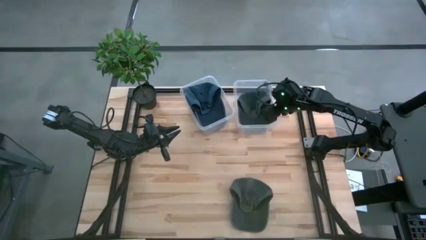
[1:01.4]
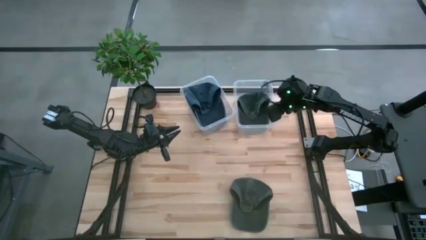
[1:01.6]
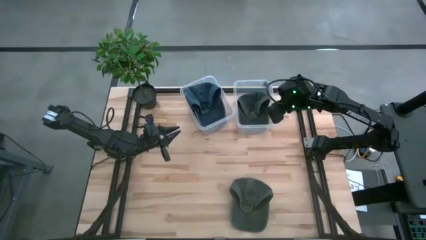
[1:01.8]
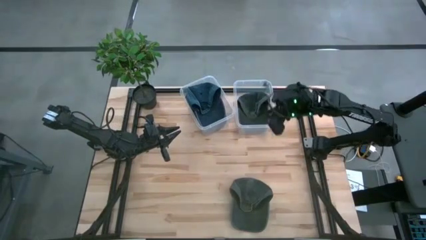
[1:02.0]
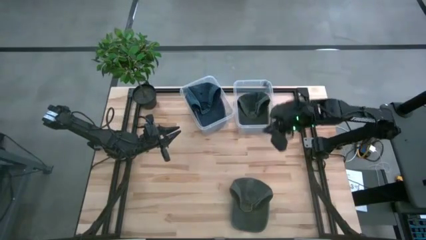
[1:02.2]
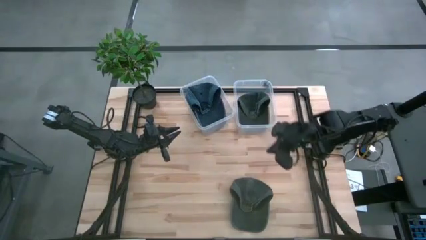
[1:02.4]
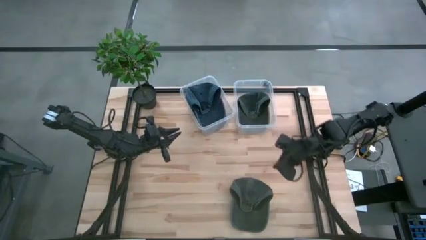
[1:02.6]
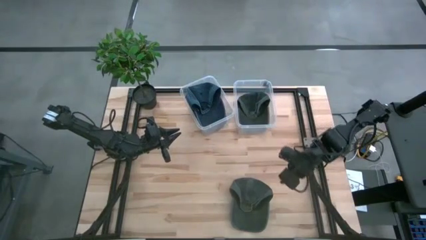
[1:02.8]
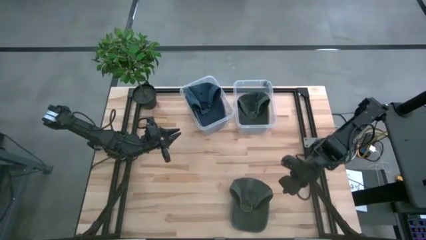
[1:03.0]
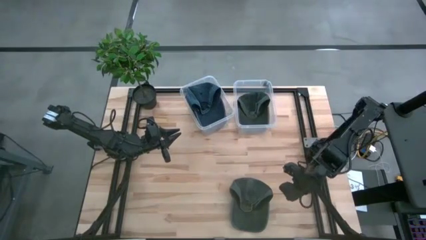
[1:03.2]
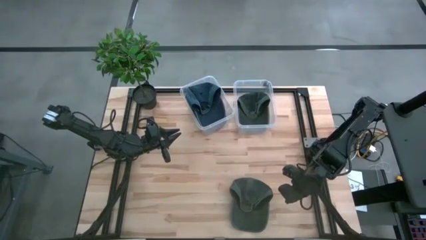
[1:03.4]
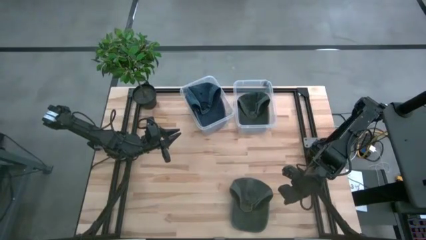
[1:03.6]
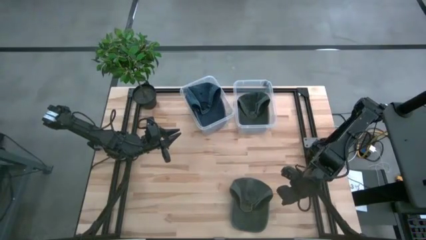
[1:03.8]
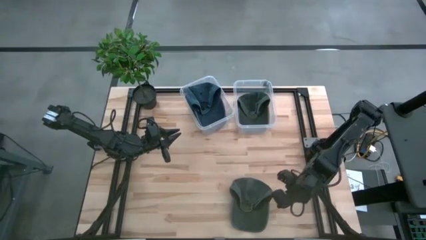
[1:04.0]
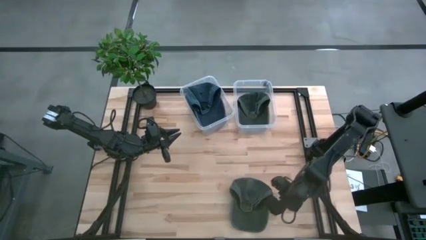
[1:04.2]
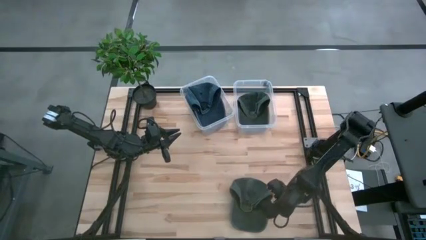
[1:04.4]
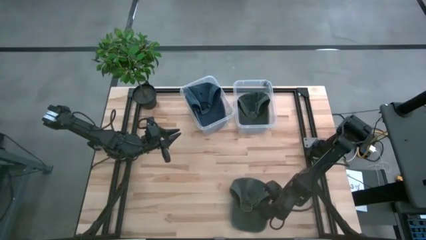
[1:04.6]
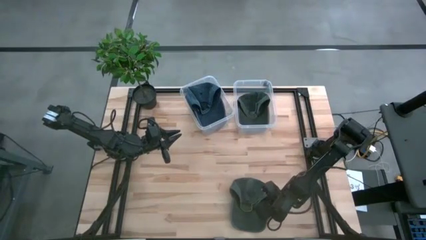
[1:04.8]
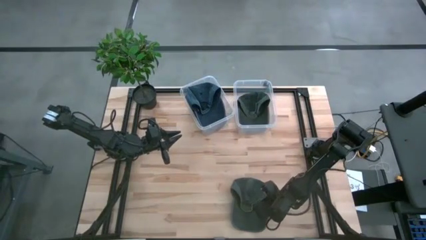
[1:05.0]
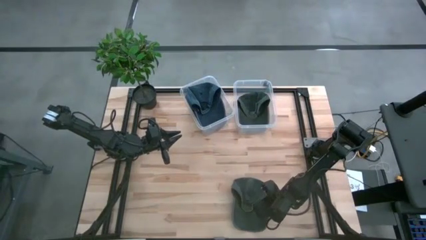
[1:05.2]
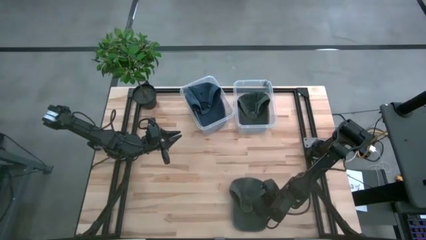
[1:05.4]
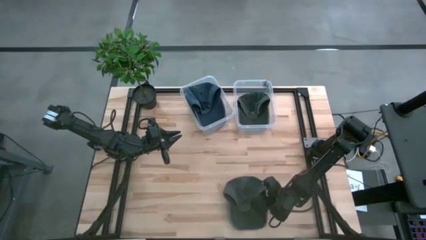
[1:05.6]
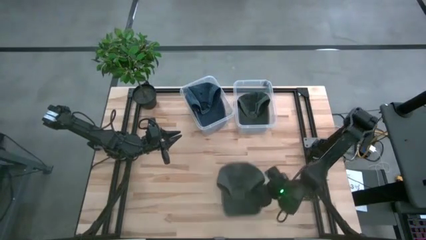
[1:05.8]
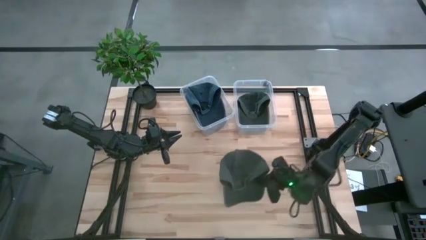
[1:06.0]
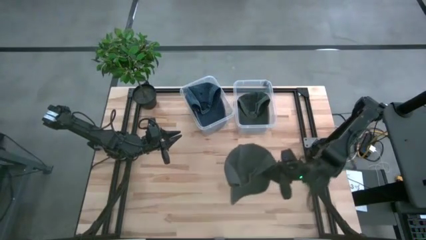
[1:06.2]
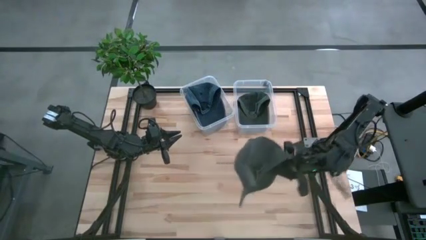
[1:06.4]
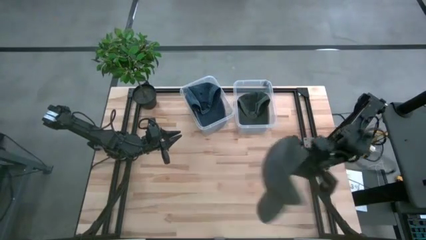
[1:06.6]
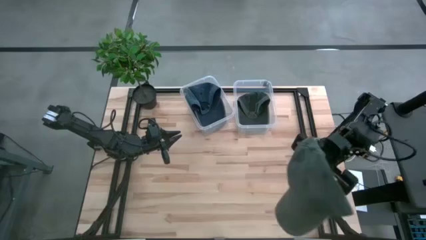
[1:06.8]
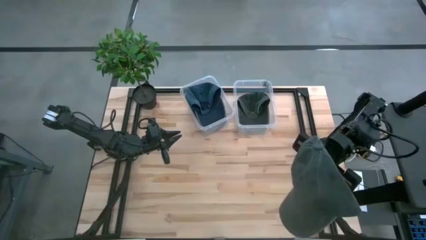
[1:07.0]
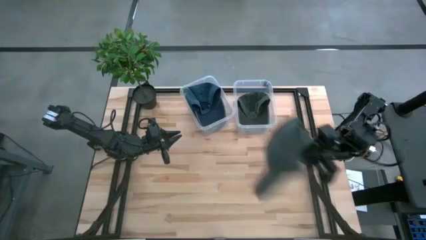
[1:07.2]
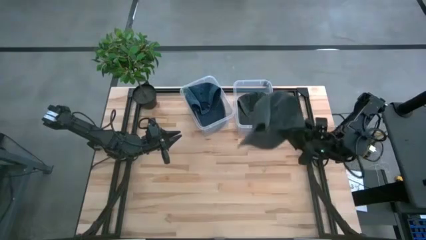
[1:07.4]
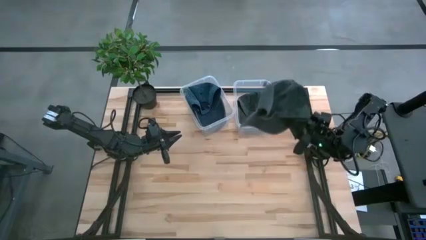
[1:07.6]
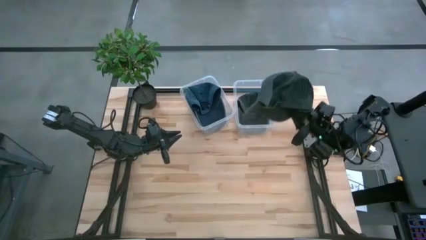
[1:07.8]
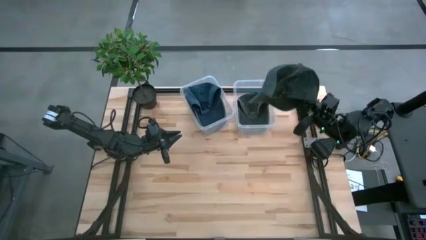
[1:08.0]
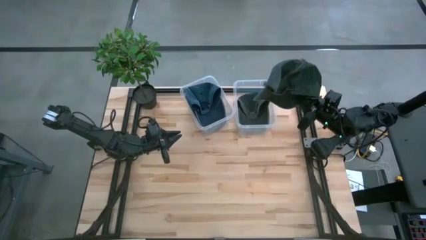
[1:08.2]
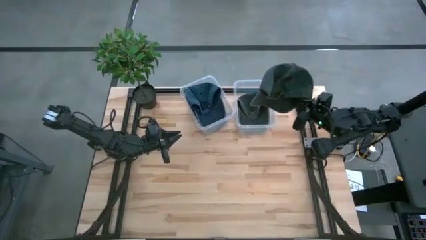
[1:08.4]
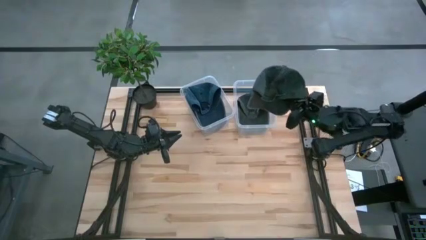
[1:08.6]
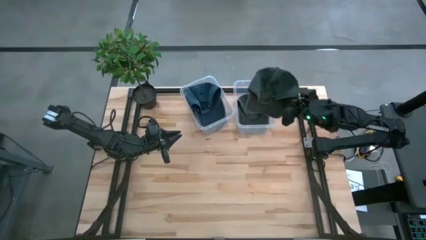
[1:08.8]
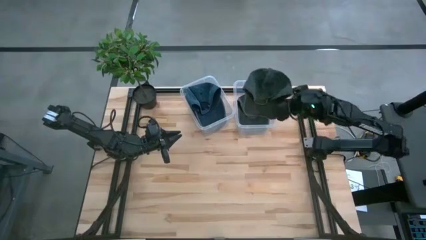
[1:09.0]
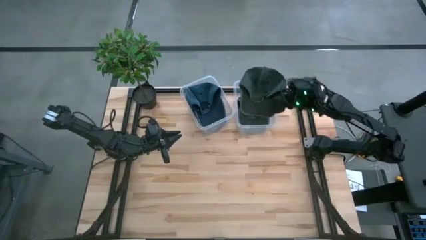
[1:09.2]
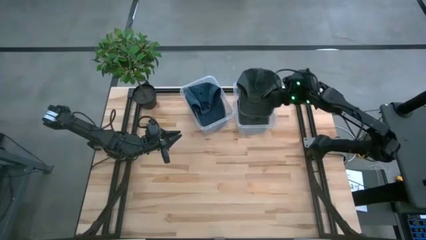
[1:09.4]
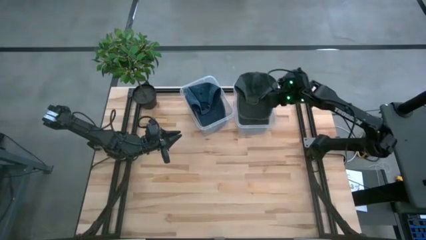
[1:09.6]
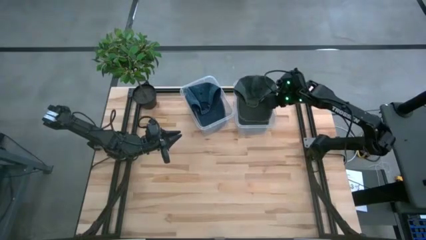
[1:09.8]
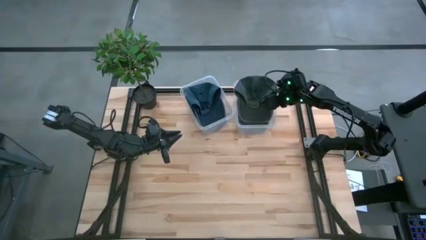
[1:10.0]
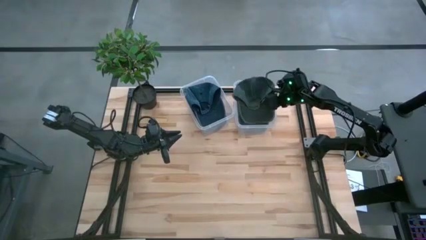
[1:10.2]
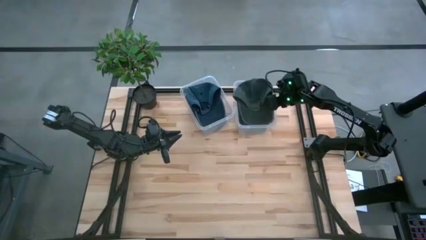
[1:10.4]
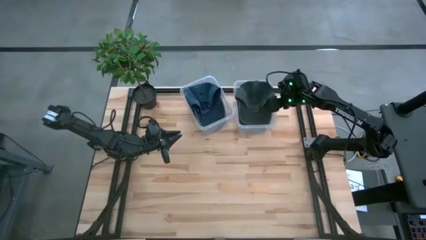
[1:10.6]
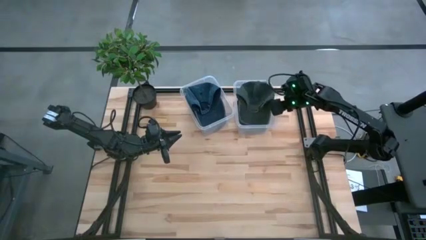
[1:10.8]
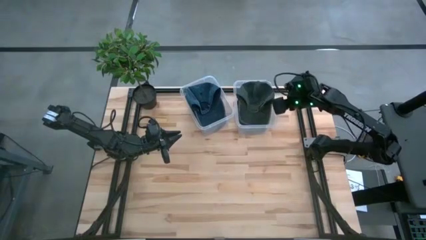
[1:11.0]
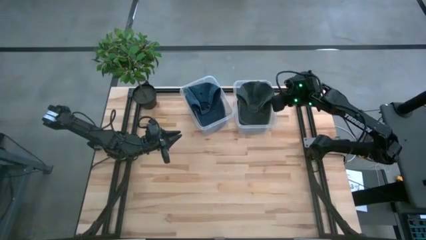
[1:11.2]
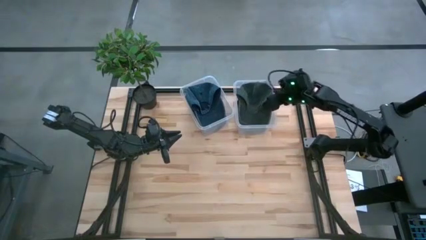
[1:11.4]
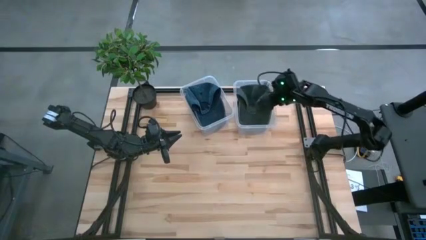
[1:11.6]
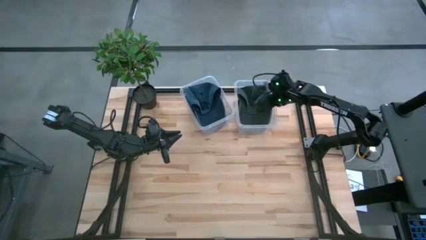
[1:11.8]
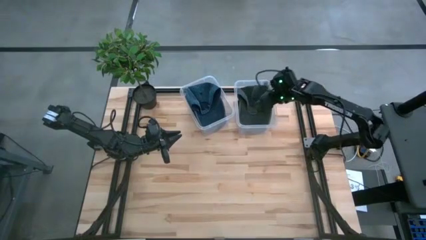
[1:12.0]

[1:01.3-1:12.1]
Task: Pick & Place hat
Put the black cap into the right transparent bin

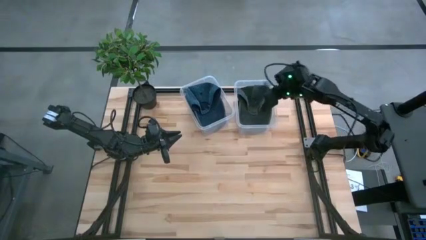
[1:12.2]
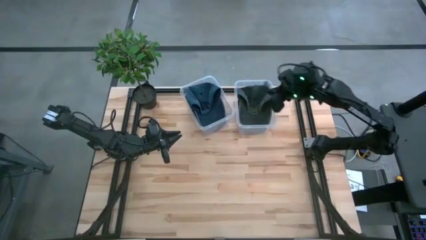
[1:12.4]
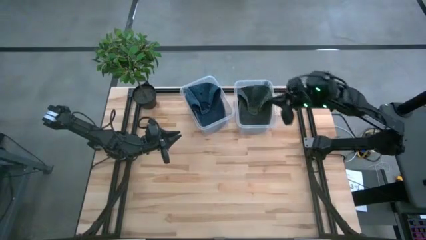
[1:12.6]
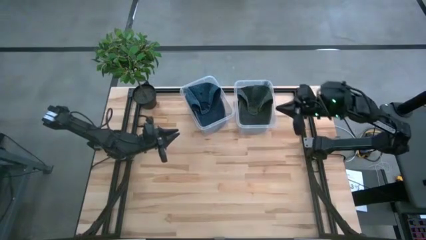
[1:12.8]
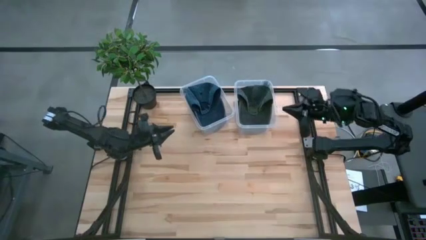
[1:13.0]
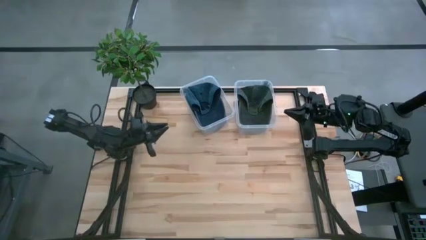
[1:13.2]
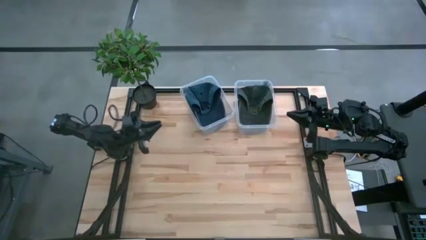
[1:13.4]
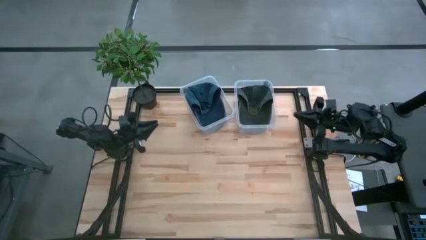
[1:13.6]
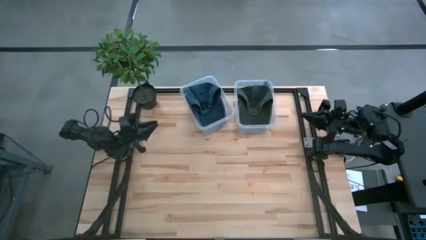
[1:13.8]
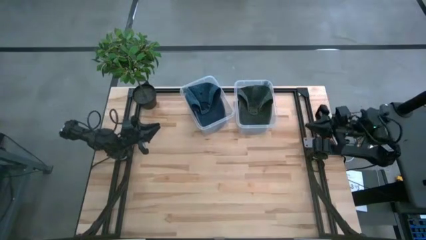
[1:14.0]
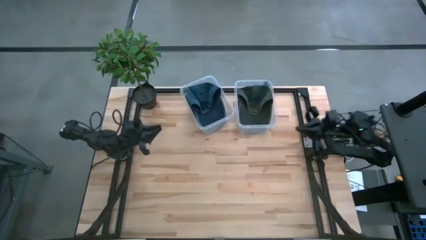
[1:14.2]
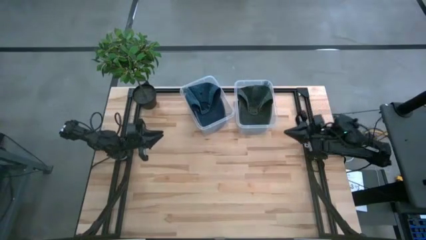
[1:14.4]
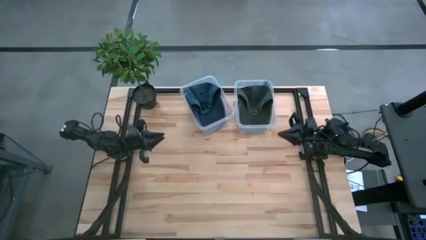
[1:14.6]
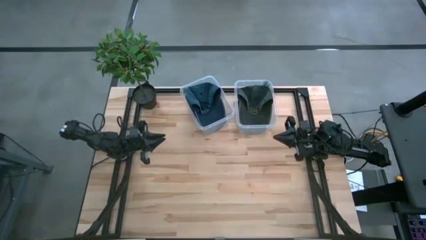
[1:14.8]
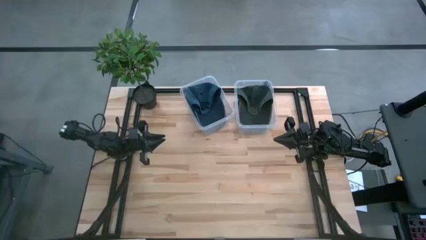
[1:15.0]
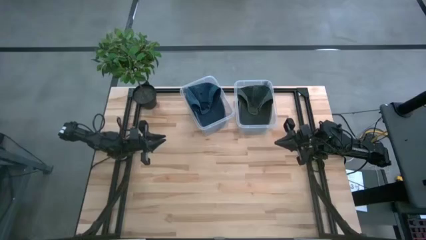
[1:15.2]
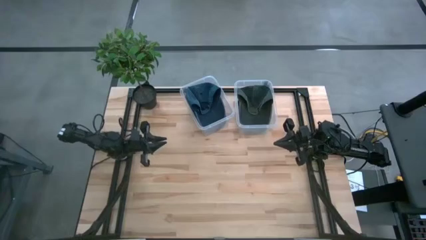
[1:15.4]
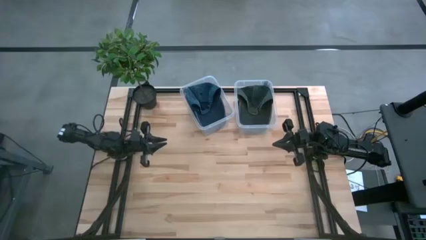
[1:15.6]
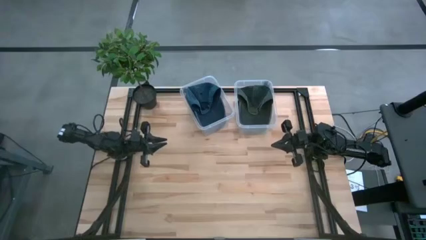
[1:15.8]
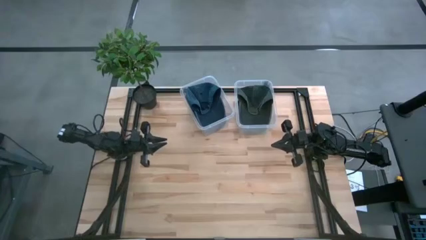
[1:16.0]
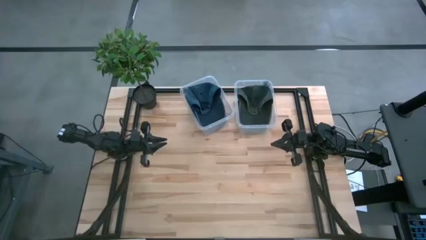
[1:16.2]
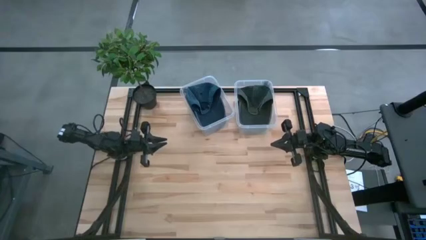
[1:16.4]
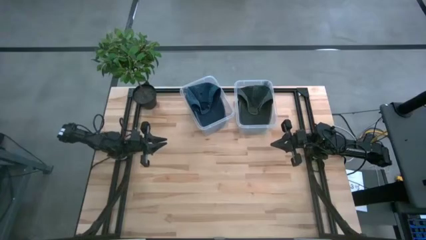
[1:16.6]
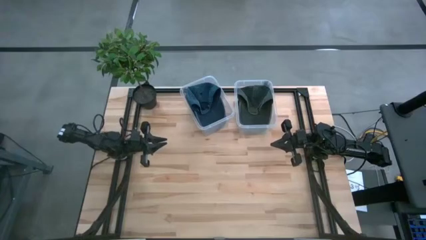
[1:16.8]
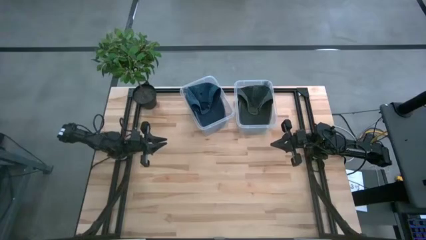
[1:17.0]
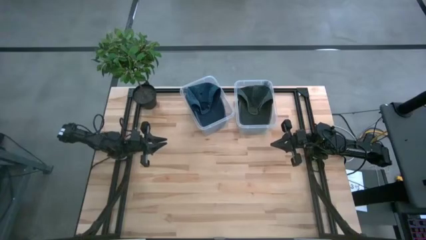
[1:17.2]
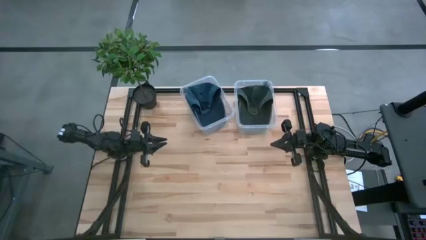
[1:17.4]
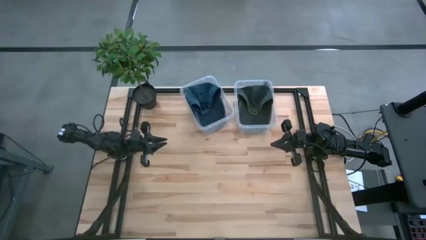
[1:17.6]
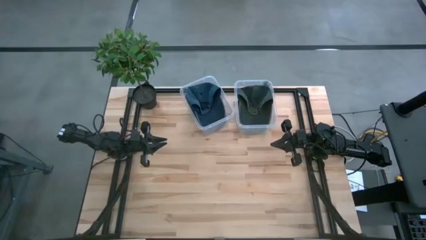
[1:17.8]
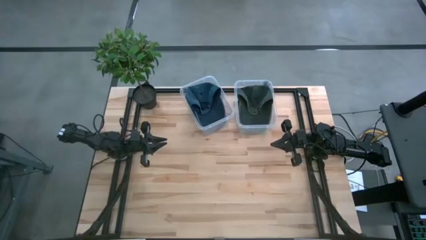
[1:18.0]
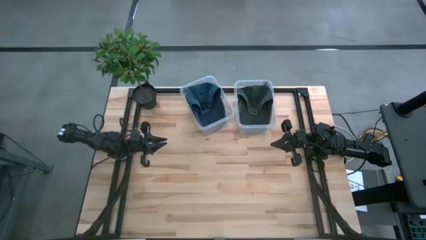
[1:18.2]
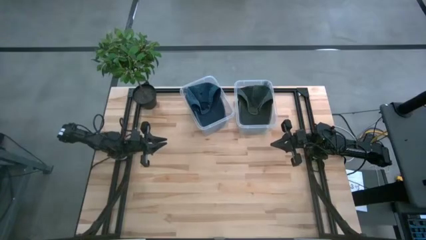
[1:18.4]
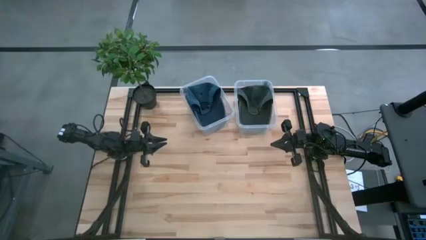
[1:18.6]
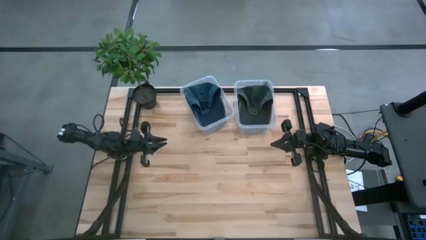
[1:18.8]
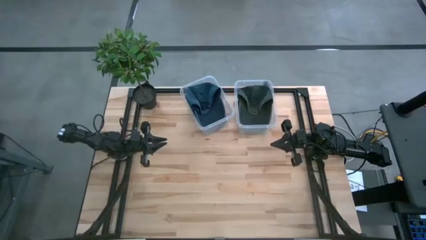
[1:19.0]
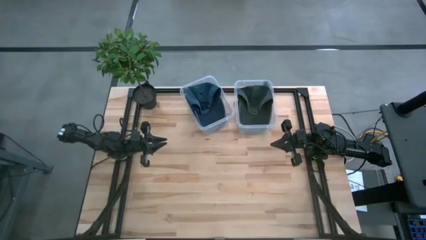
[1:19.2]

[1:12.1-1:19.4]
Return to Home Position
